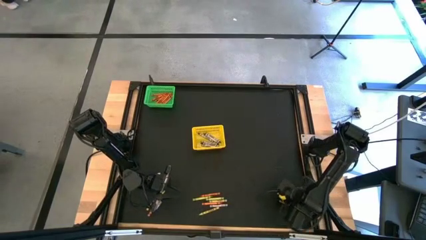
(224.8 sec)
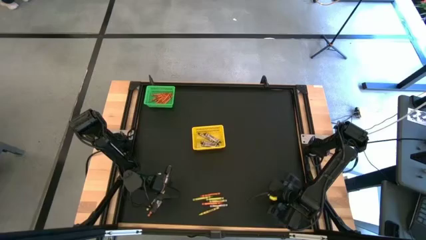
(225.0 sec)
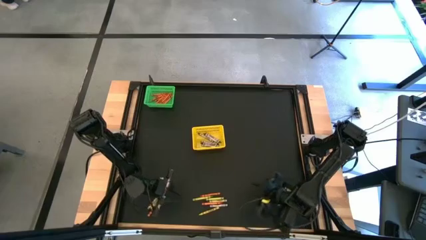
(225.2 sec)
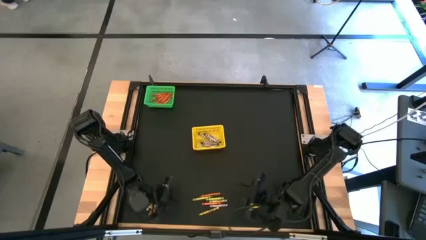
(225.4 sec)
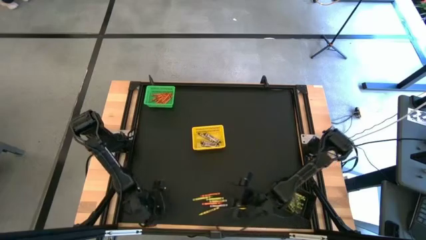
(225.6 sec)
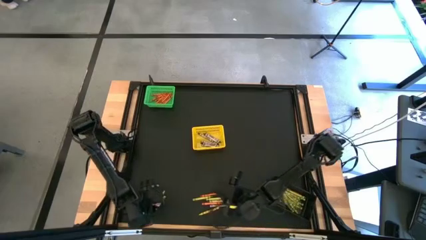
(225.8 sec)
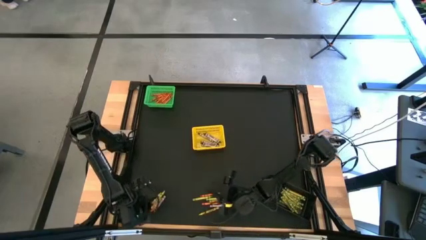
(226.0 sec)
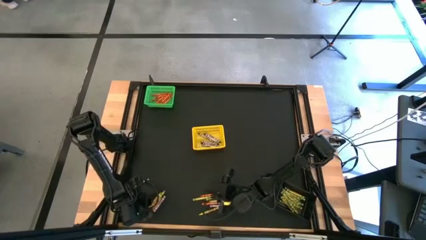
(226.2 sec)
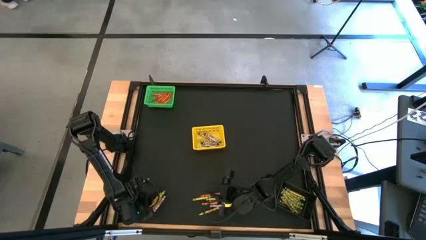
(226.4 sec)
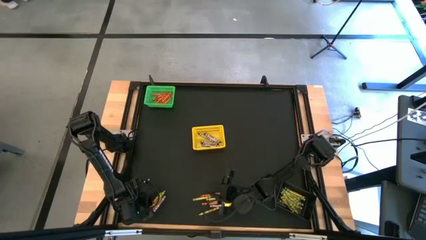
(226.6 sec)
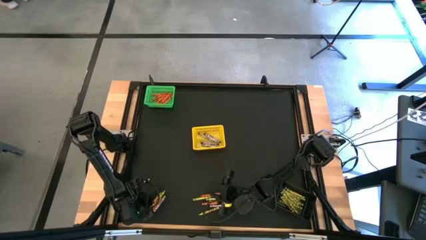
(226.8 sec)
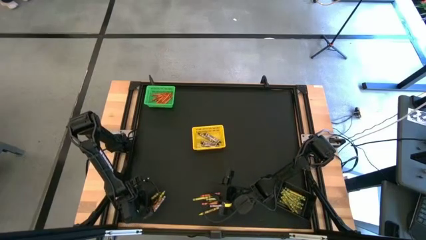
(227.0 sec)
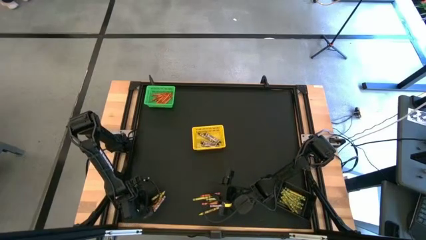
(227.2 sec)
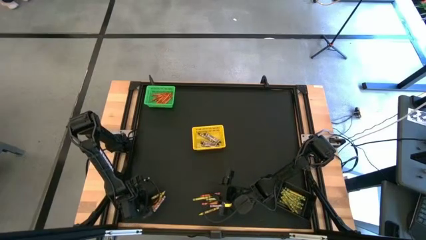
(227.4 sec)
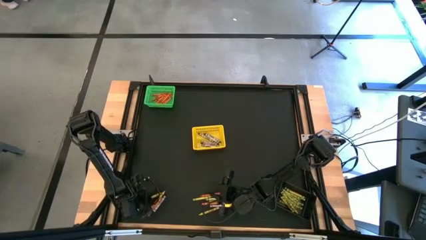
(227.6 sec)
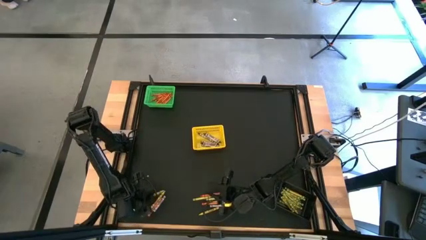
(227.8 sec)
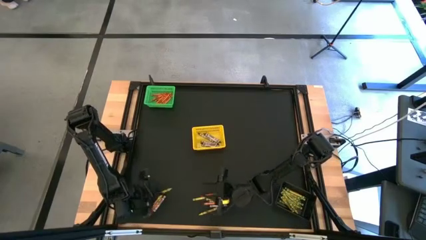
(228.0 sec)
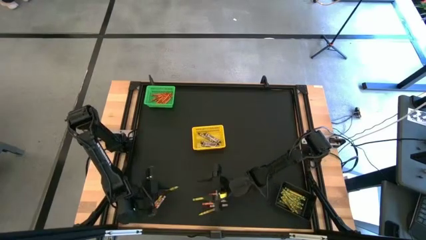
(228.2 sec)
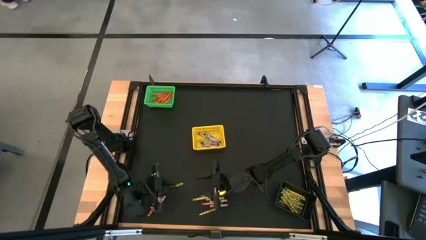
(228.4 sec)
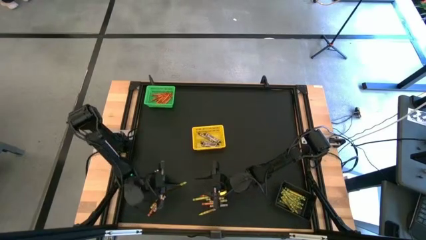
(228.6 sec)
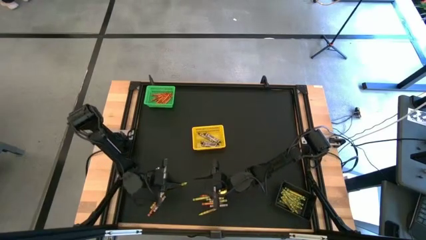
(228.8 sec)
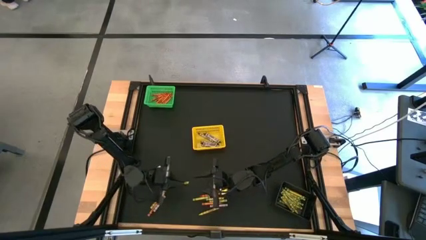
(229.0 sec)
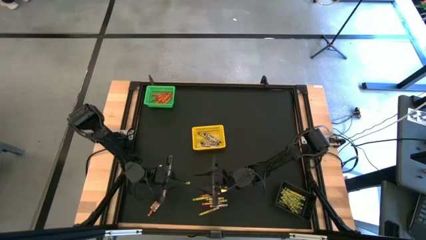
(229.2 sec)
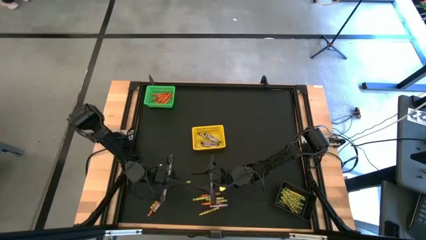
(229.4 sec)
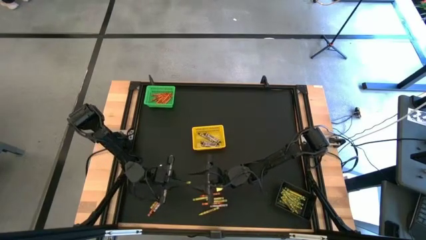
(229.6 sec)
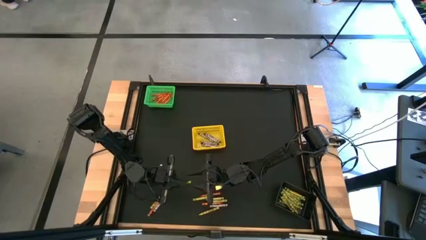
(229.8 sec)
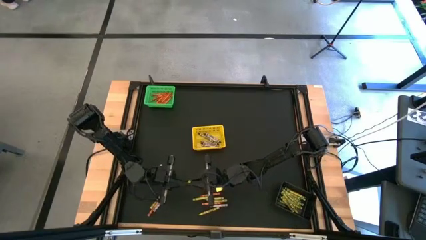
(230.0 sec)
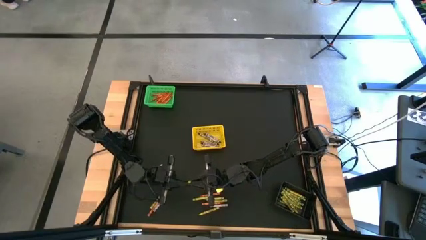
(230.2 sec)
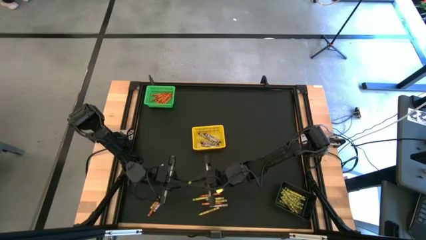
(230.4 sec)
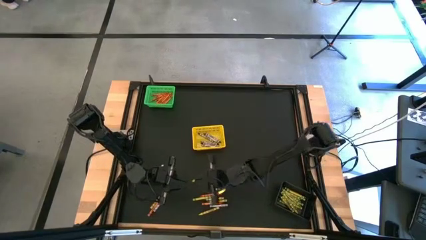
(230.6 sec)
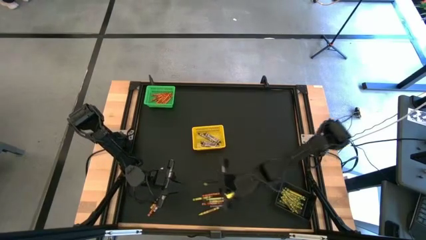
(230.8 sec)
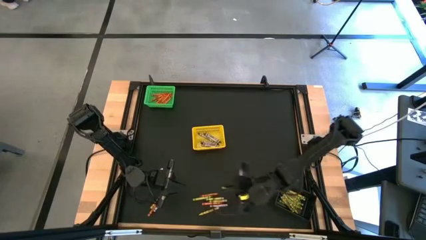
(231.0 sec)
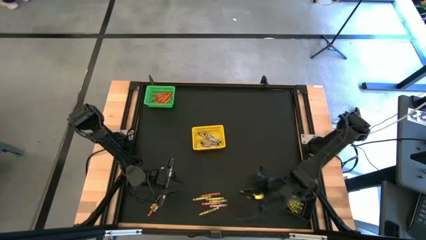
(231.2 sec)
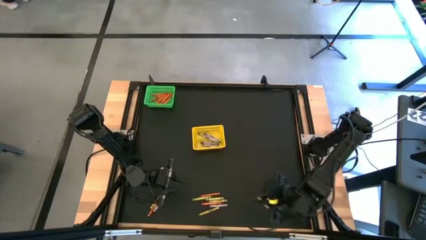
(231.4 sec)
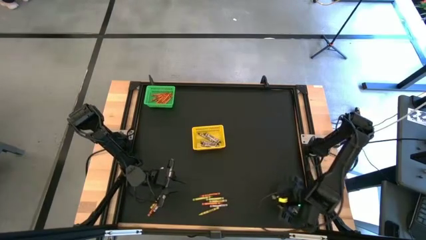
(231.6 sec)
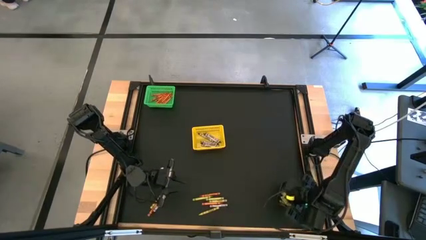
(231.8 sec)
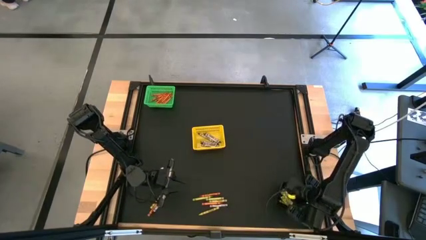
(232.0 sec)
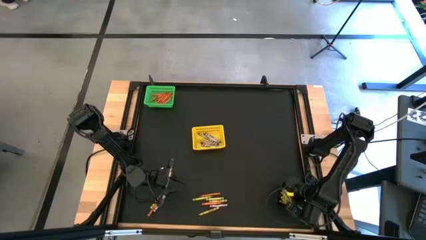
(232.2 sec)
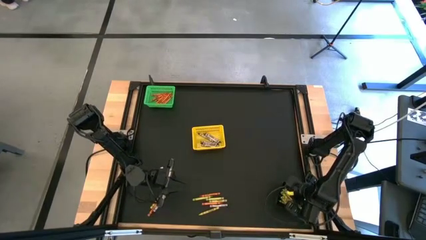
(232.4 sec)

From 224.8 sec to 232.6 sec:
Task: Sort crayons
Put the green crayon into the black bin

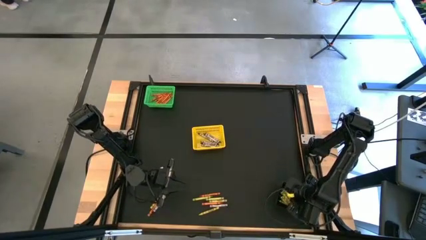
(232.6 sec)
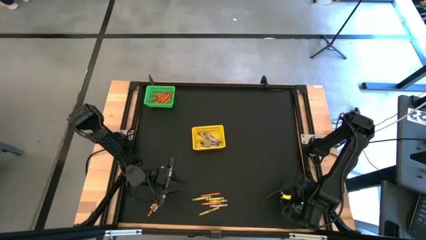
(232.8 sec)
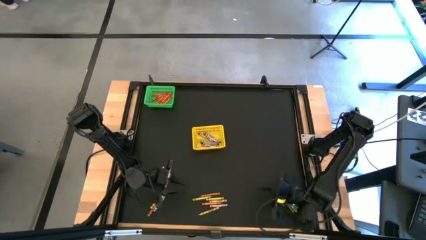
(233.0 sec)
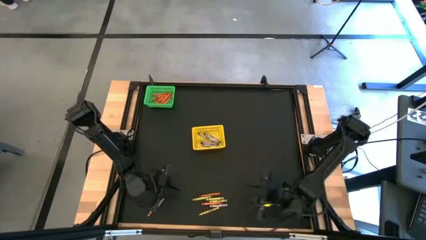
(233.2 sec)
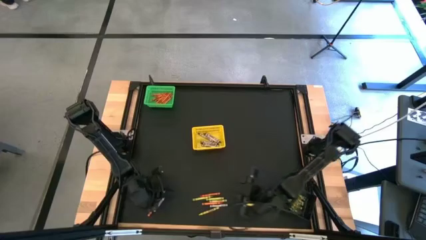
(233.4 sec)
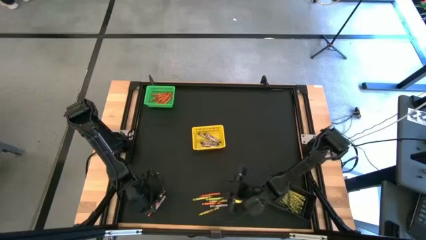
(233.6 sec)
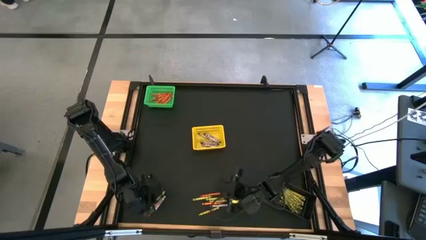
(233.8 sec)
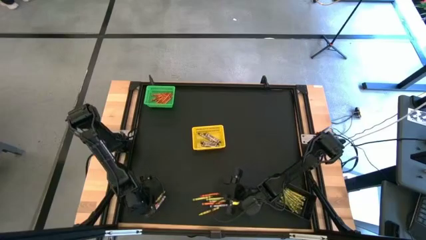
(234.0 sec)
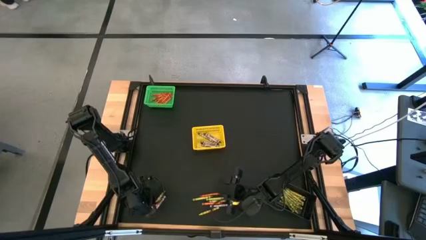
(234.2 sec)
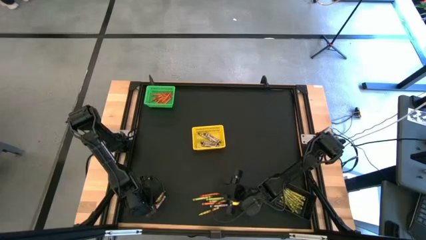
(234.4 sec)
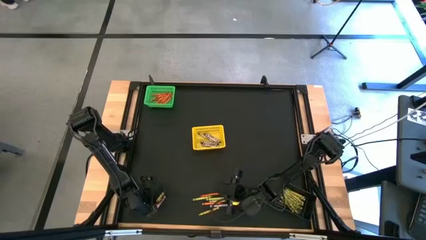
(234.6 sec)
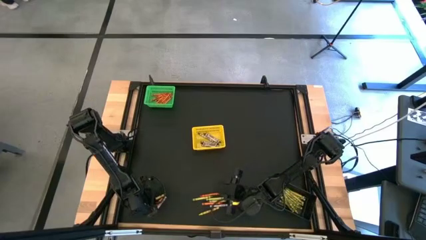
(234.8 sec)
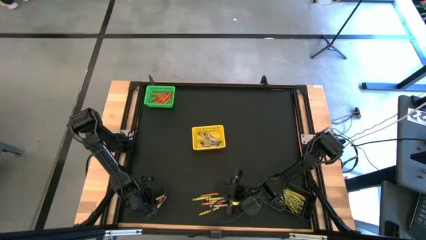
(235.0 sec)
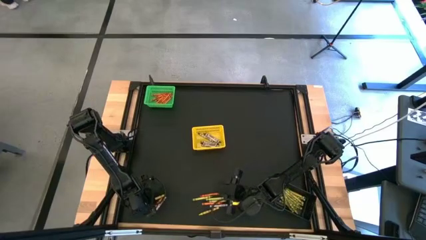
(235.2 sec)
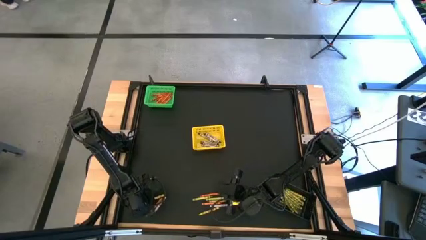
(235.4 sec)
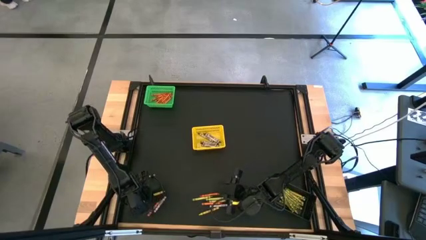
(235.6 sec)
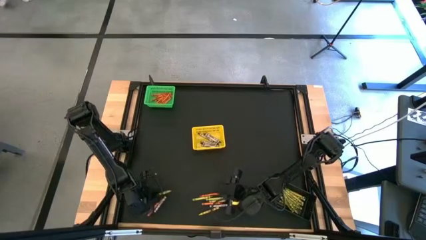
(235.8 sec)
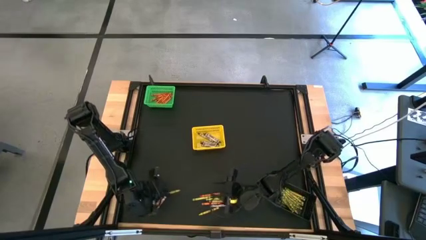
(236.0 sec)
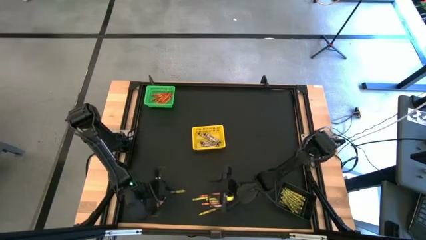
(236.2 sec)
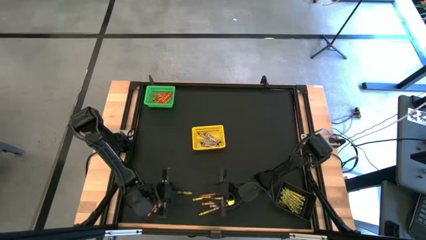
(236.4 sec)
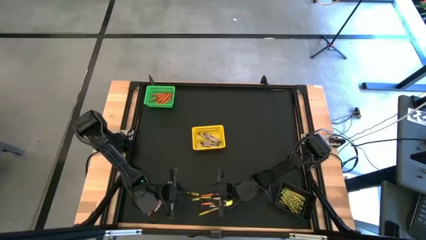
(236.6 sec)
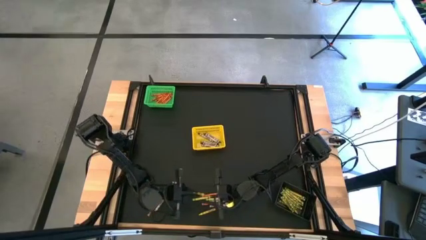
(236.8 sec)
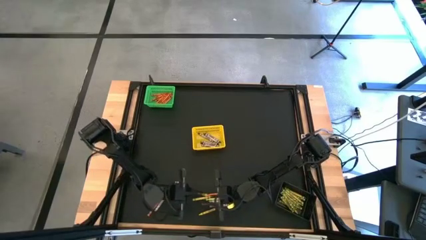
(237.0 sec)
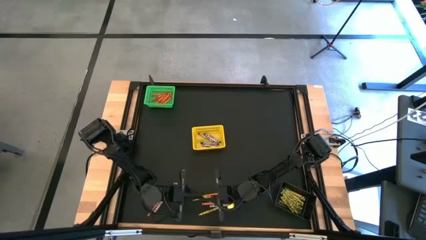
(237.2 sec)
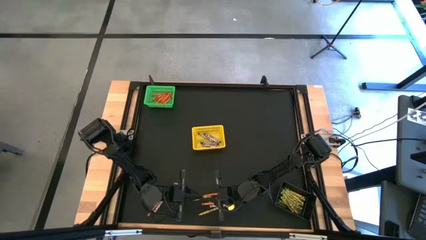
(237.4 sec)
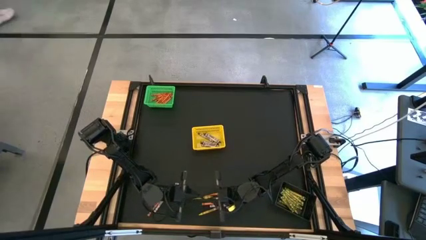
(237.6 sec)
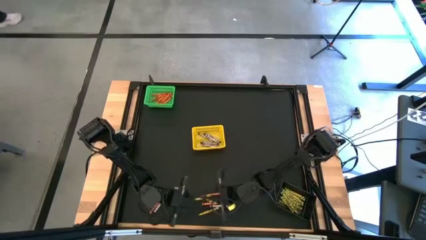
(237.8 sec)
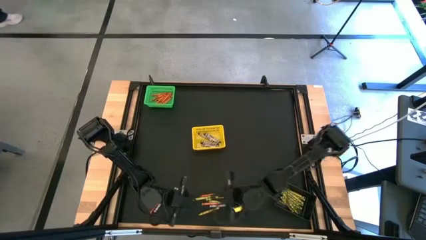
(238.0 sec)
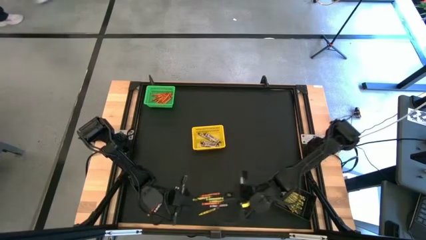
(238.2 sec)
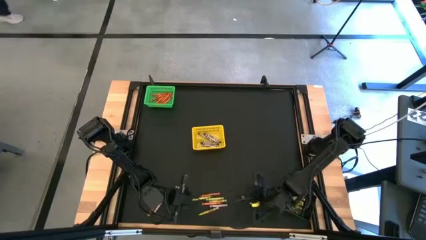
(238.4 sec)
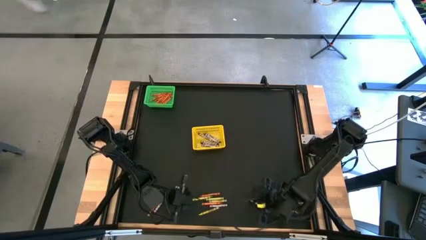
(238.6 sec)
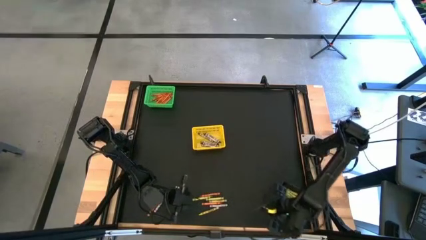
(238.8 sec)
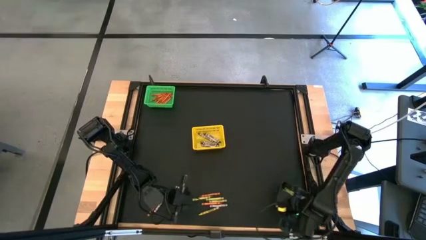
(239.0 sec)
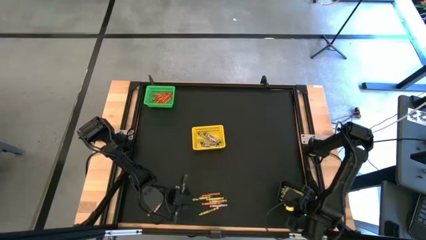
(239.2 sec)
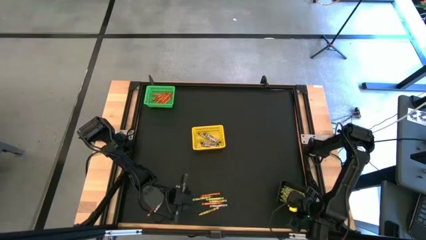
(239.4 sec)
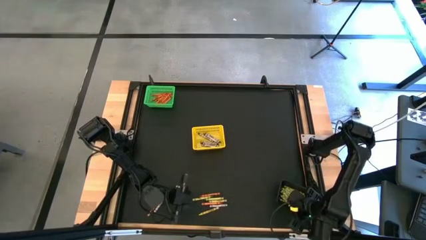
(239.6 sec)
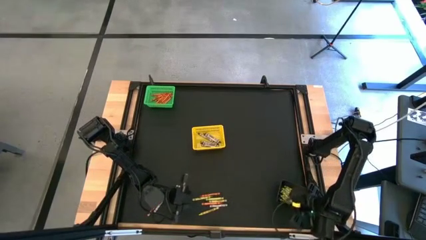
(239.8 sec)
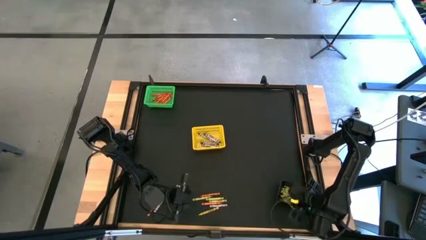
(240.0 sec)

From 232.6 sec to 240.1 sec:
Put the green crayon into the black bin
